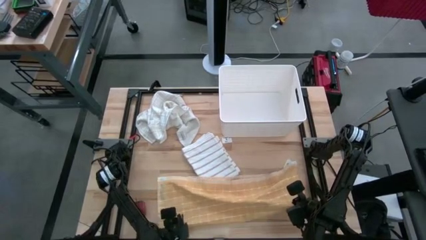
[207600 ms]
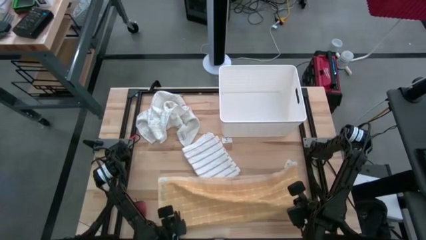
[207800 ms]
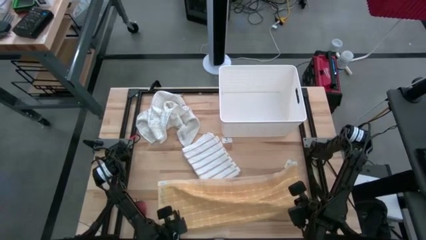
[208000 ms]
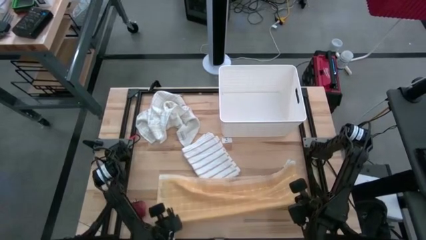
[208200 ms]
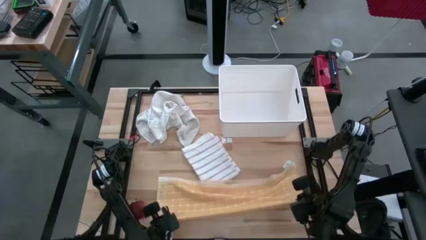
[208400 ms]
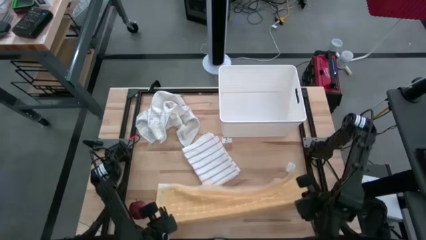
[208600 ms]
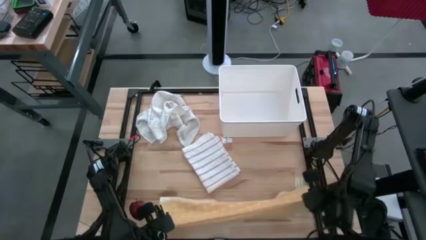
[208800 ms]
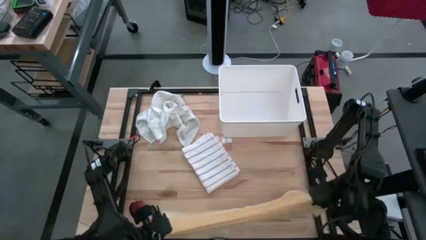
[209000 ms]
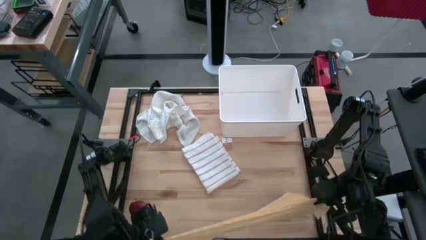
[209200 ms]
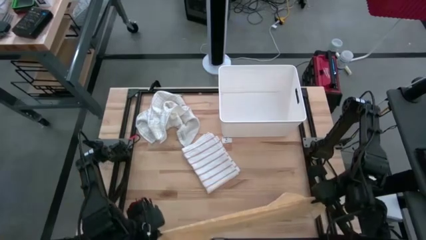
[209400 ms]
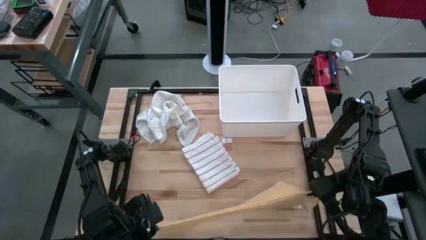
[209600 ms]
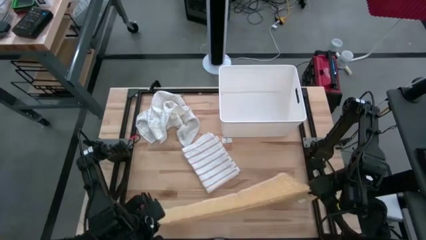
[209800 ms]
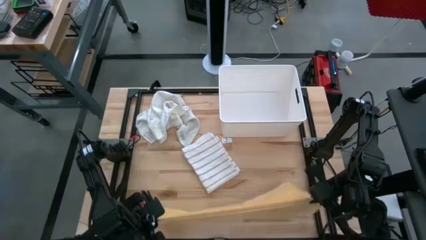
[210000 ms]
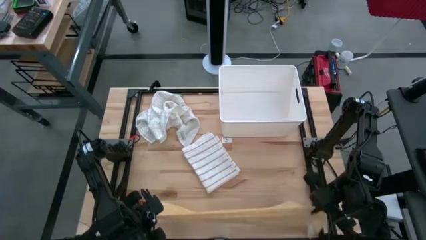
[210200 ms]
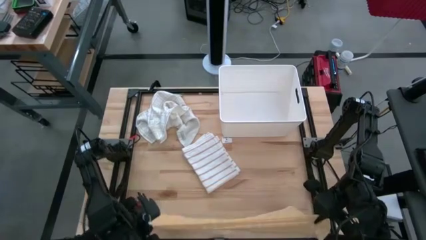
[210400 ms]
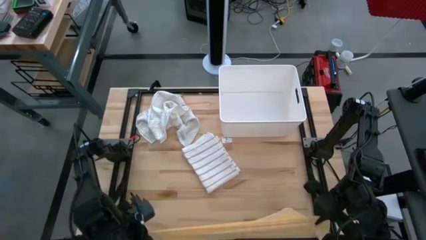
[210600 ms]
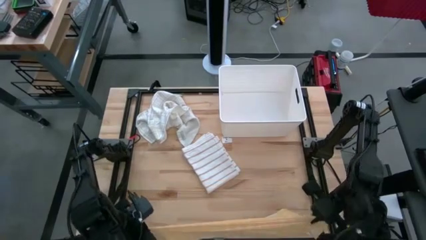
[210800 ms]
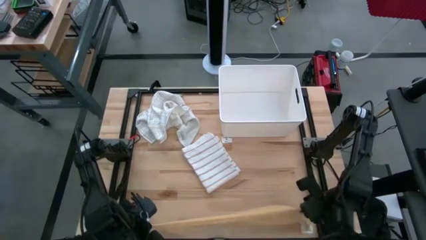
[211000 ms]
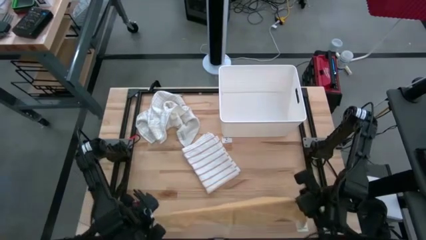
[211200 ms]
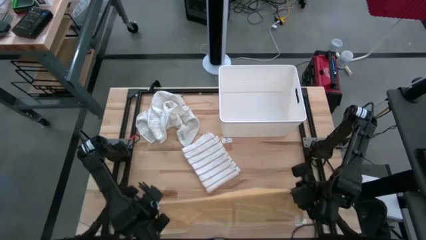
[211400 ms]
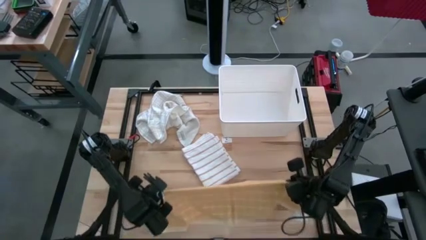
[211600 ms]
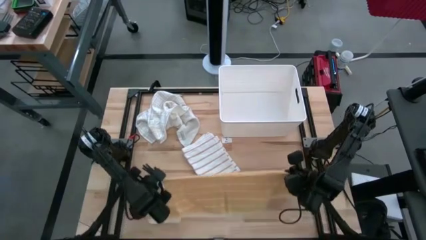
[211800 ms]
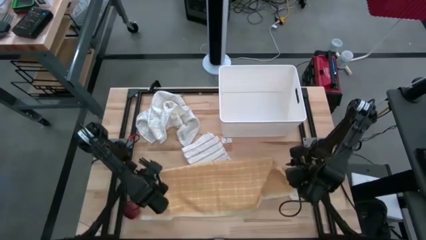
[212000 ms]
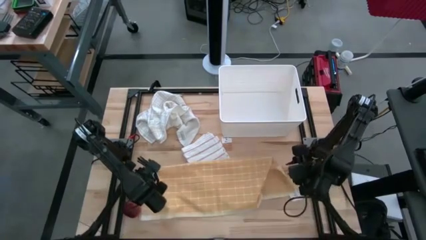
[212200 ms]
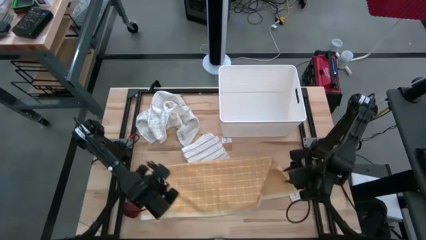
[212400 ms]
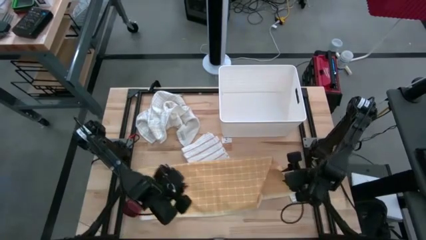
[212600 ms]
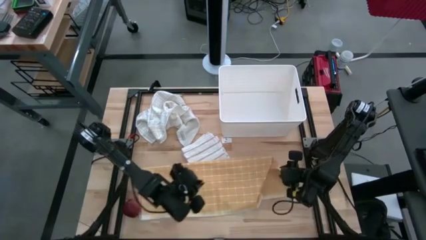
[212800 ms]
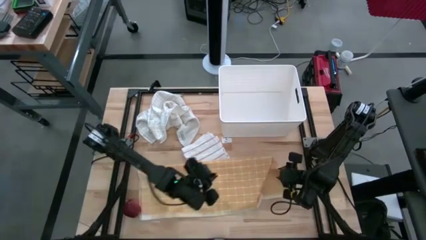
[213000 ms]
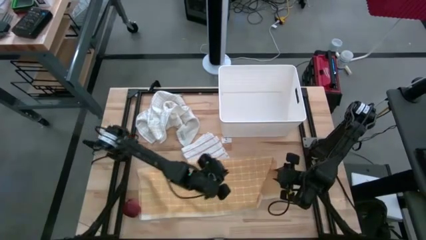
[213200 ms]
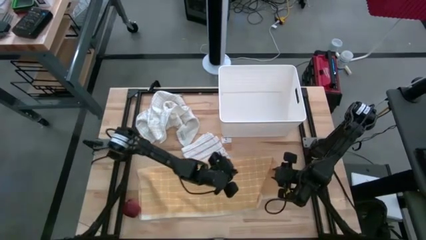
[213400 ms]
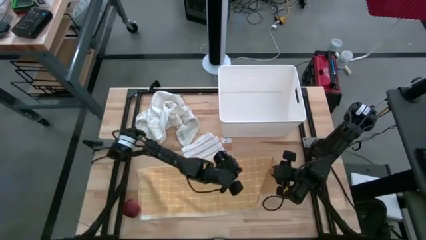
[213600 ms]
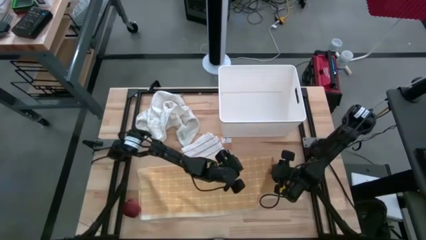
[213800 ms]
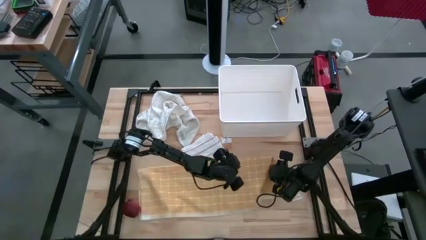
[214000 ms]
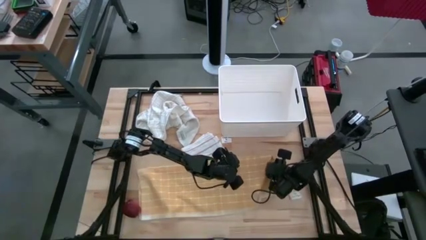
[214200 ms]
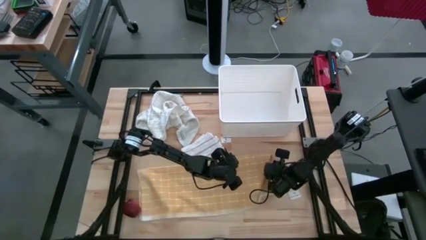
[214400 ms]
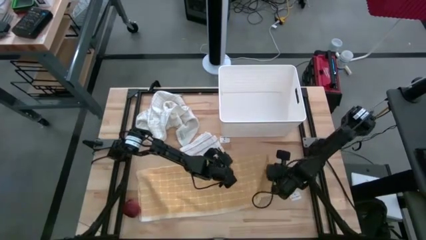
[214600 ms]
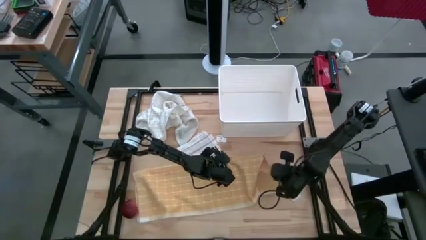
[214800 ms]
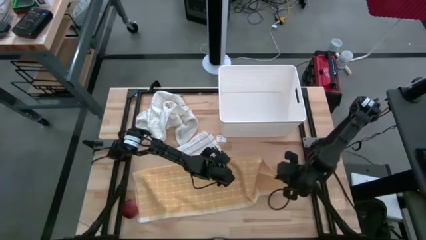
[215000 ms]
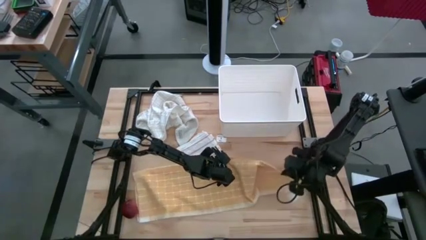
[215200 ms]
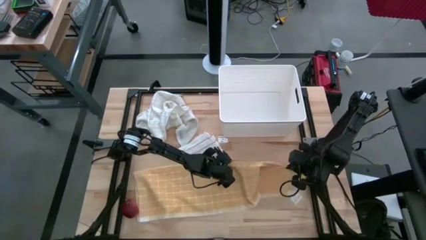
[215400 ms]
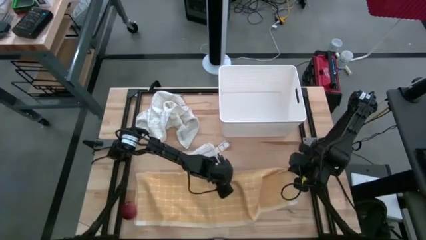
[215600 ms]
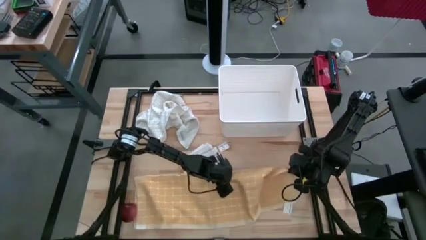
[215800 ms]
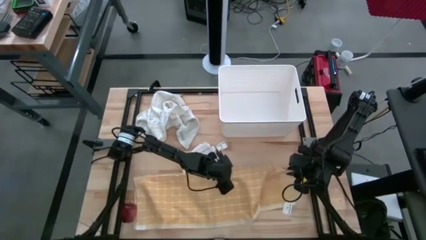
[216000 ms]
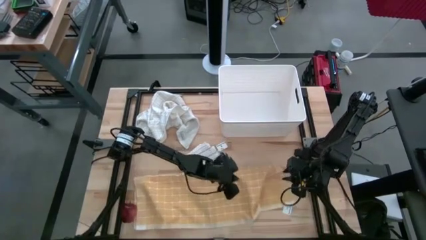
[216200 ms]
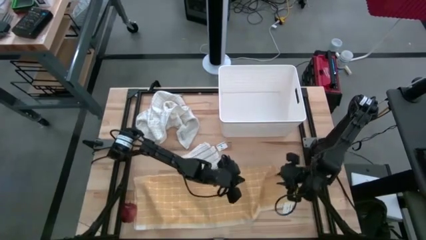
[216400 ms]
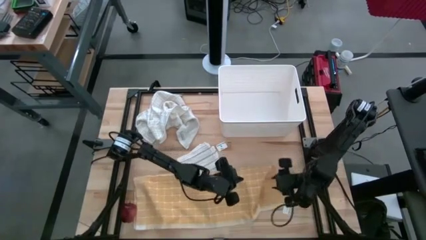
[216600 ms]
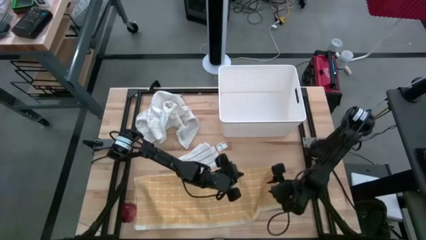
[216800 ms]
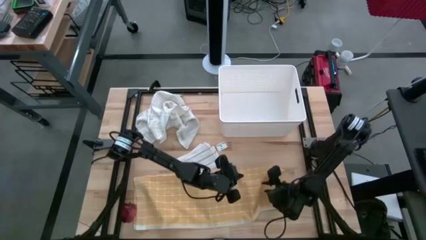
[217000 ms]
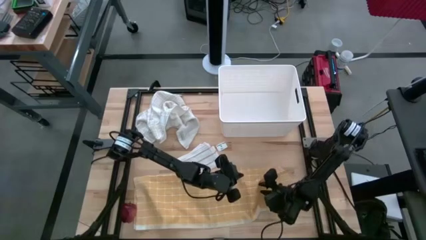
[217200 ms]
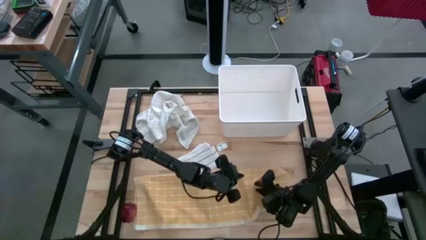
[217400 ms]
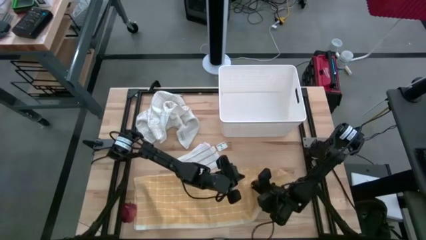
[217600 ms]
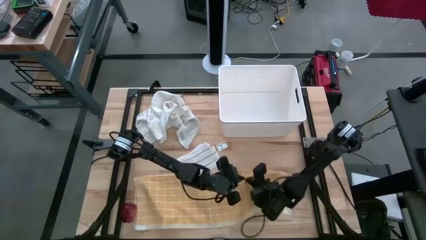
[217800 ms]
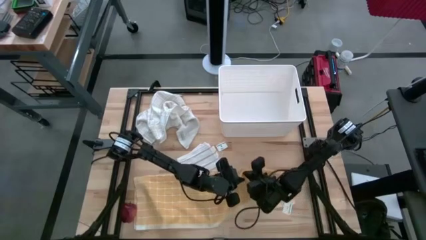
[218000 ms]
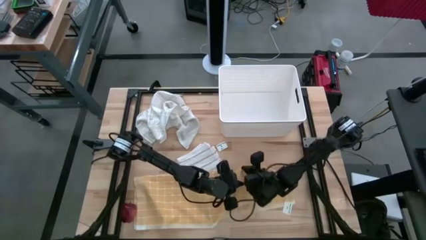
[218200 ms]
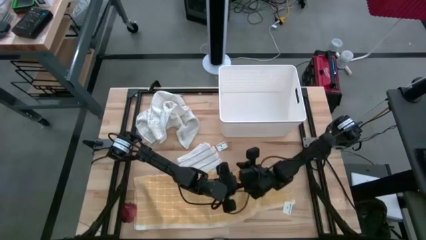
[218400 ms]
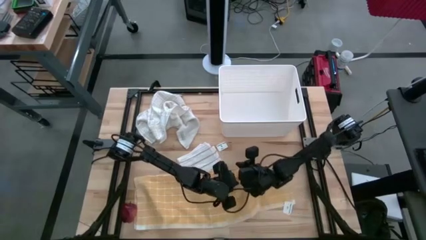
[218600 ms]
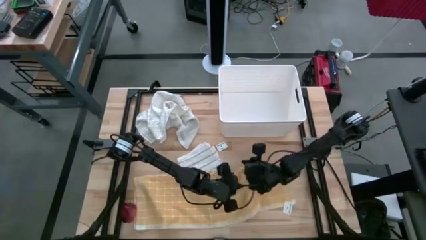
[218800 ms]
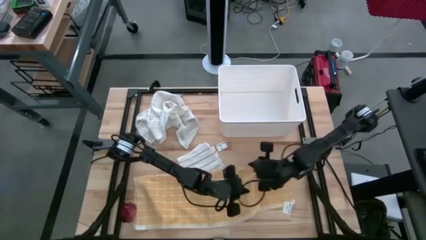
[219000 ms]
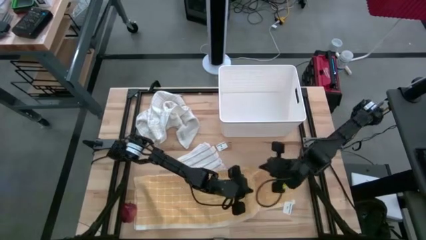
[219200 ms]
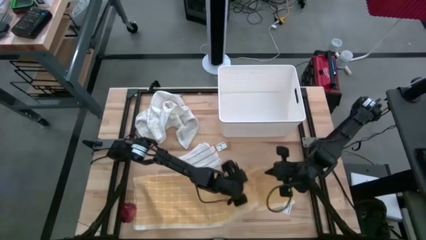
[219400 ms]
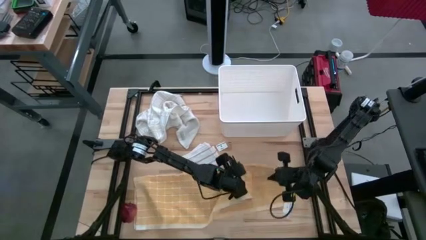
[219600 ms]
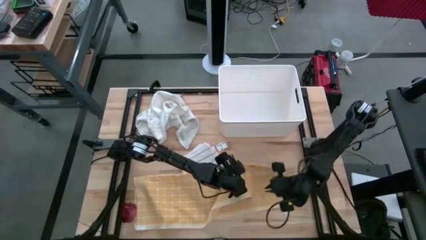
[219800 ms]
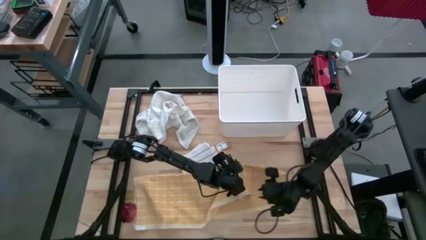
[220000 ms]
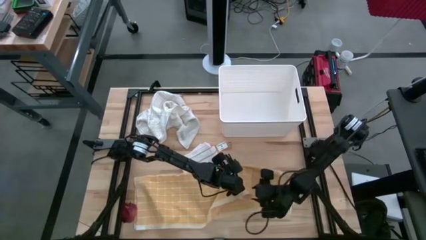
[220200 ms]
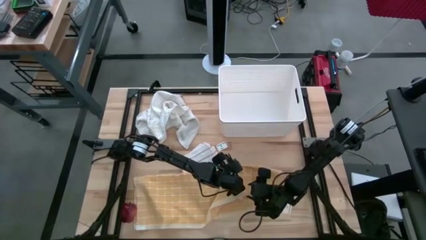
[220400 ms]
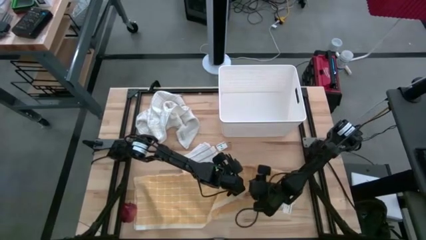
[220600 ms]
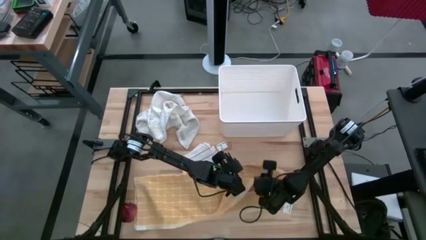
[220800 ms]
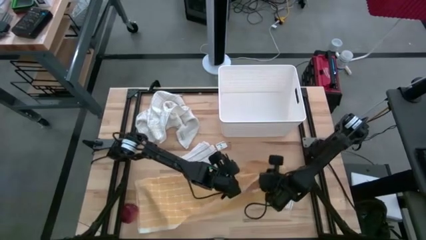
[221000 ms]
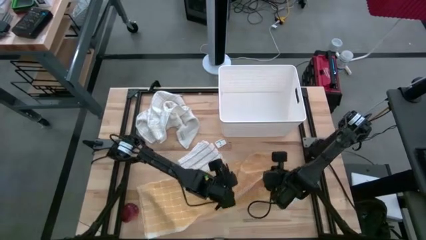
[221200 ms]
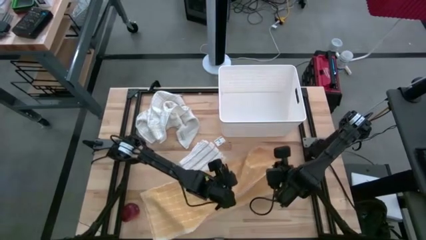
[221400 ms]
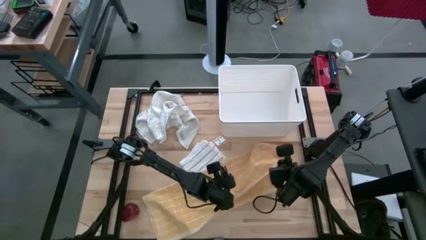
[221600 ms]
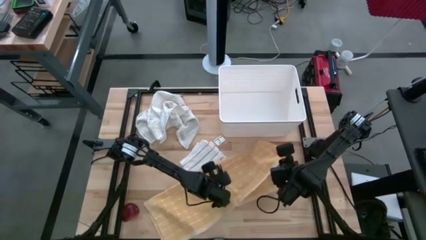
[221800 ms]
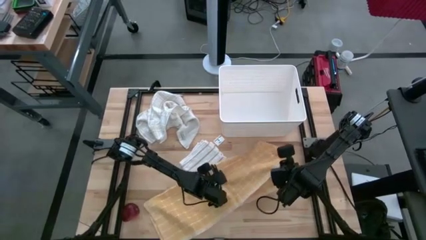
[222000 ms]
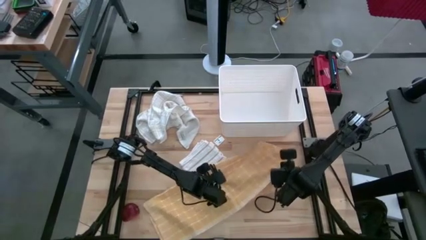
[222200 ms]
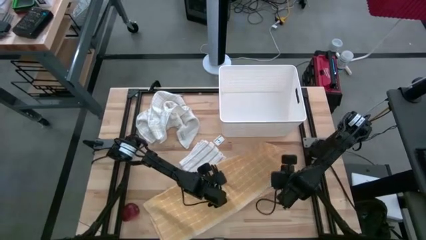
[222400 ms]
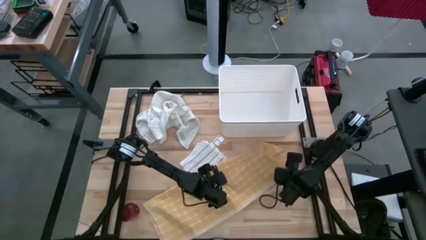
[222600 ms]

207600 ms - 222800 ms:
Task: Fold towel
Fold the yellow squared towel

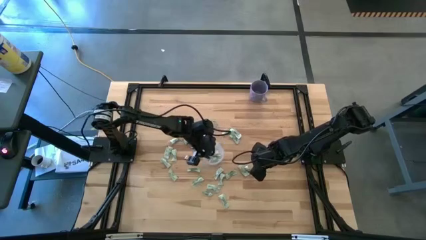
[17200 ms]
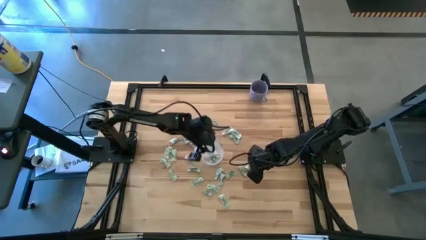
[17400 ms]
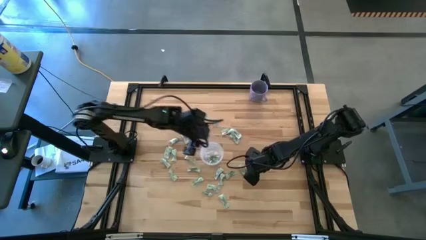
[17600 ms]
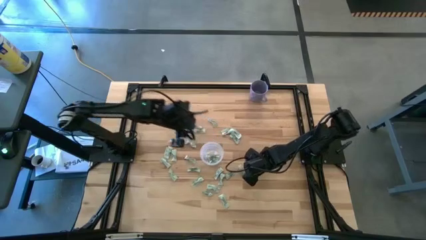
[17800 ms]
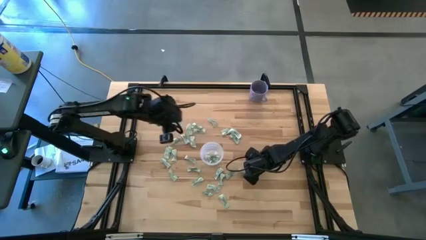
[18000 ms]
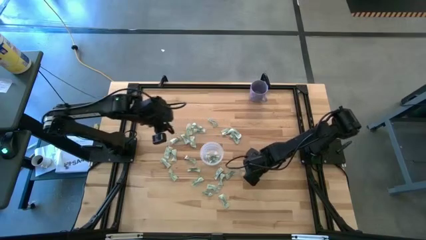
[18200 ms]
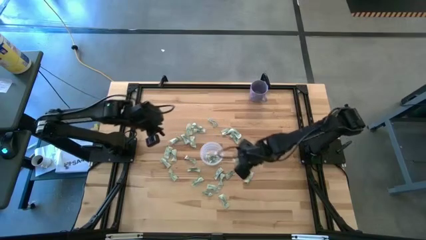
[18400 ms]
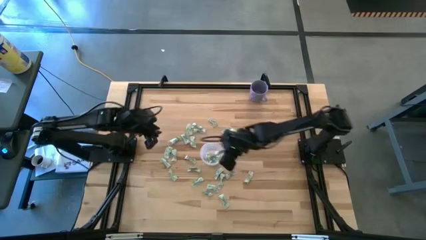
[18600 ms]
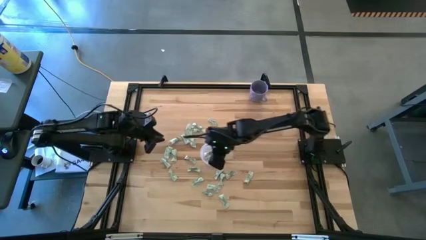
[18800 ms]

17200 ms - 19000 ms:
Task: Pick and place Stevia / Truvia into bins
Put the green stevia packet into the transparent container

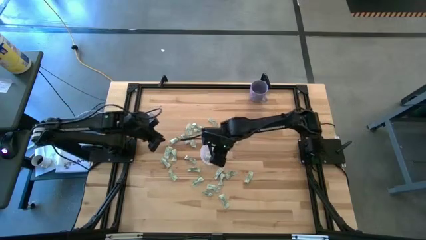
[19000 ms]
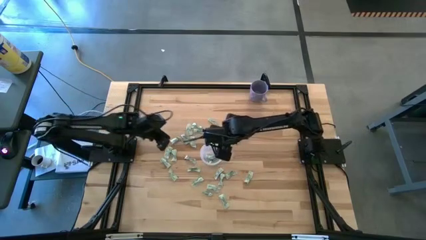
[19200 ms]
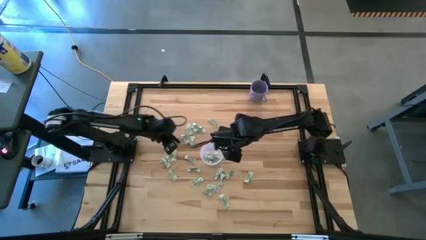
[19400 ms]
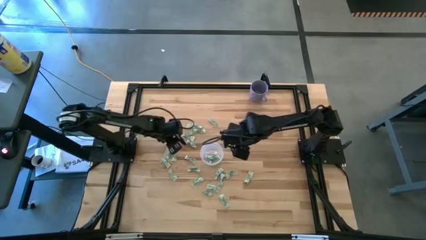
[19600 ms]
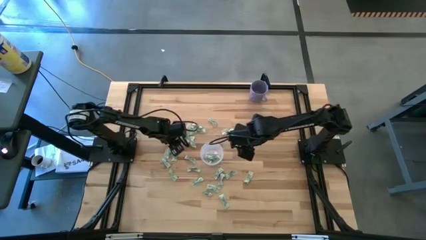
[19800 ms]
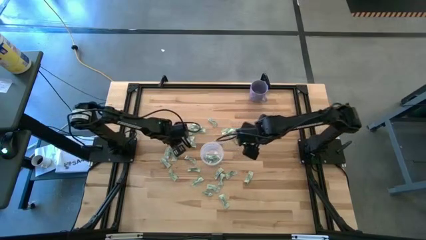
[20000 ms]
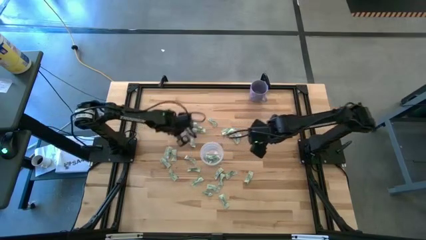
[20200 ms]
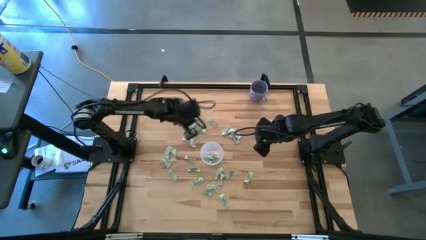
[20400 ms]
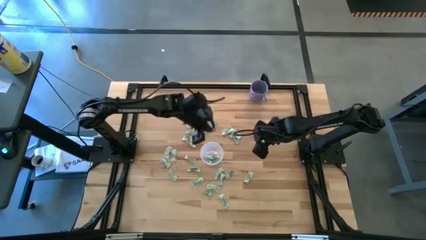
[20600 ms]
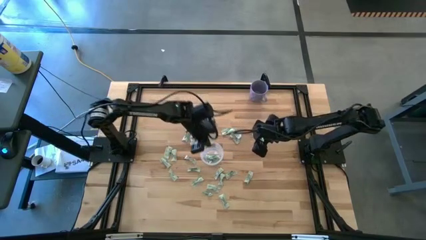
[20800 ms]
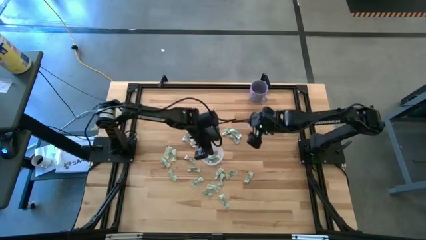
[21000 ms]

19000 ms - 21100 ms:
Put the green stevia packet into the transparent container
